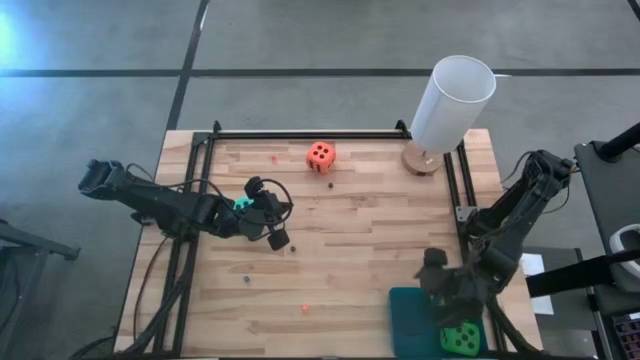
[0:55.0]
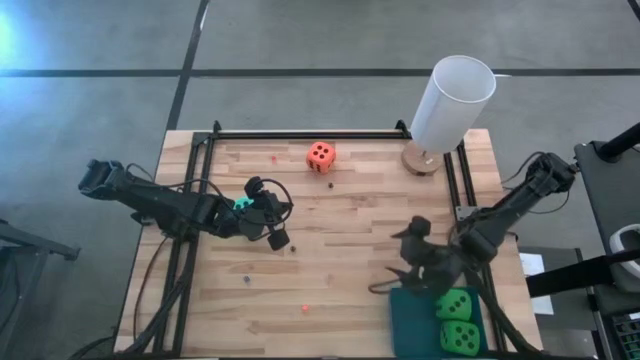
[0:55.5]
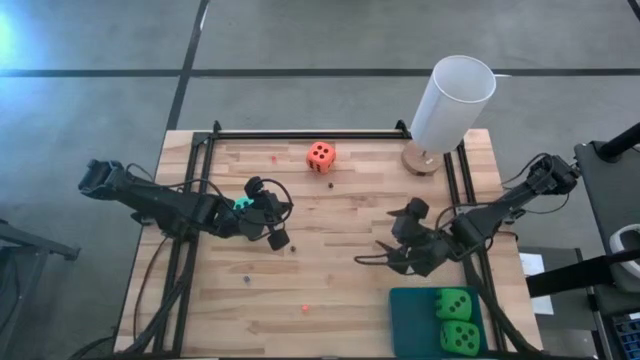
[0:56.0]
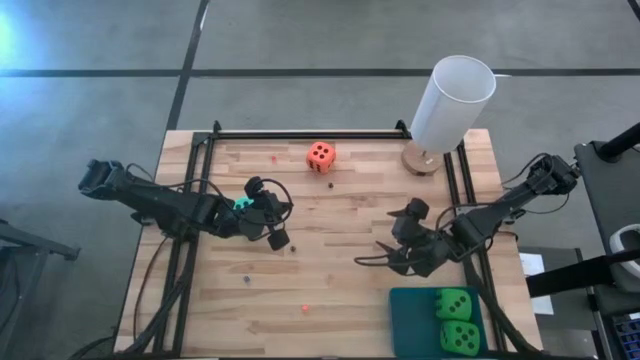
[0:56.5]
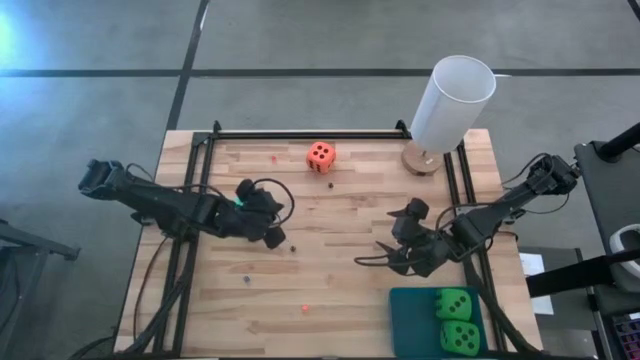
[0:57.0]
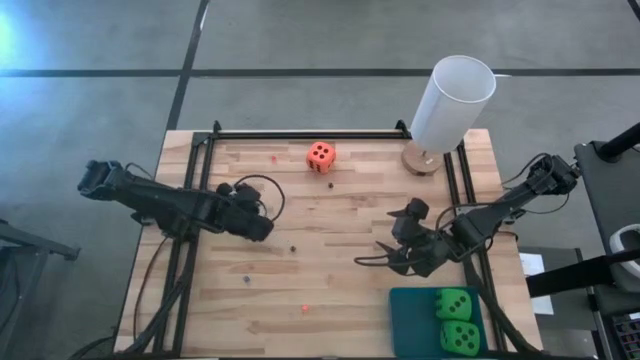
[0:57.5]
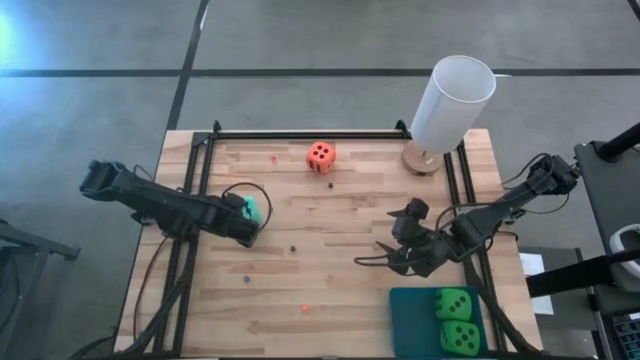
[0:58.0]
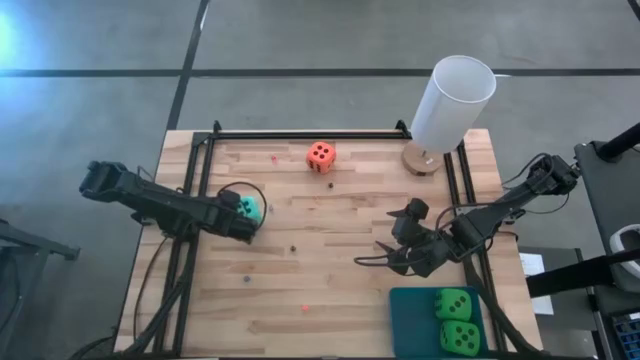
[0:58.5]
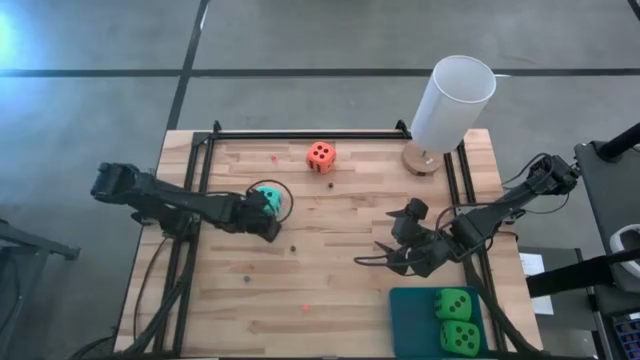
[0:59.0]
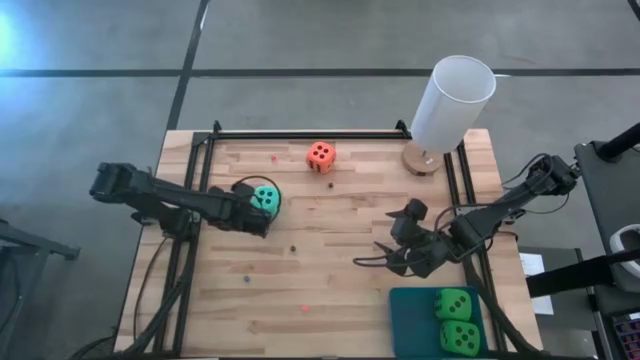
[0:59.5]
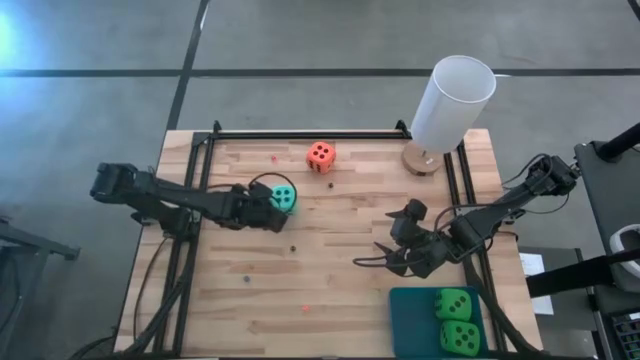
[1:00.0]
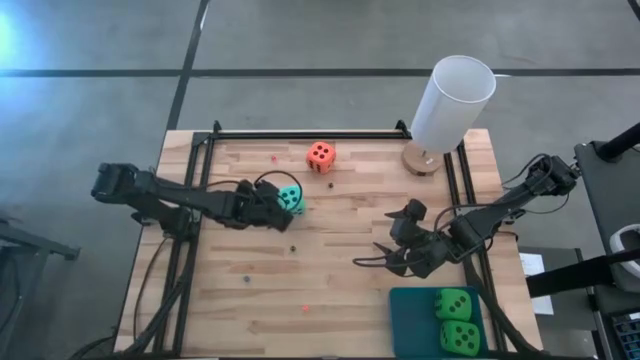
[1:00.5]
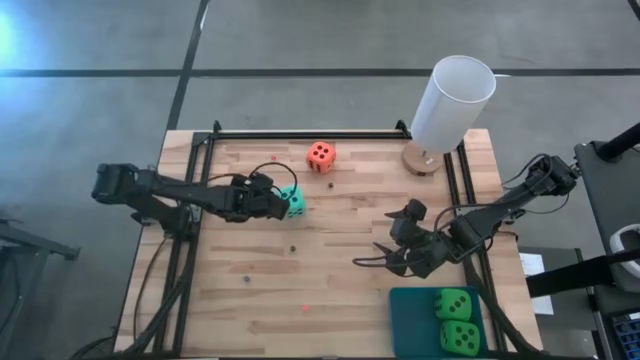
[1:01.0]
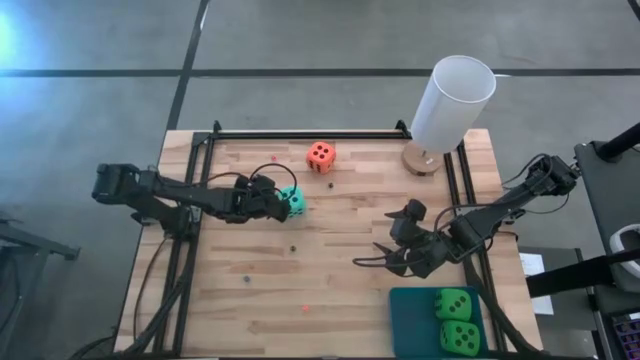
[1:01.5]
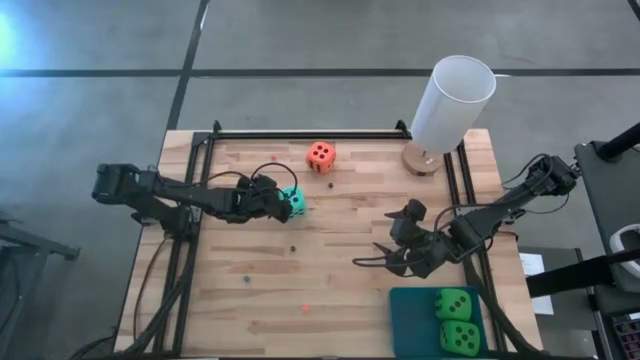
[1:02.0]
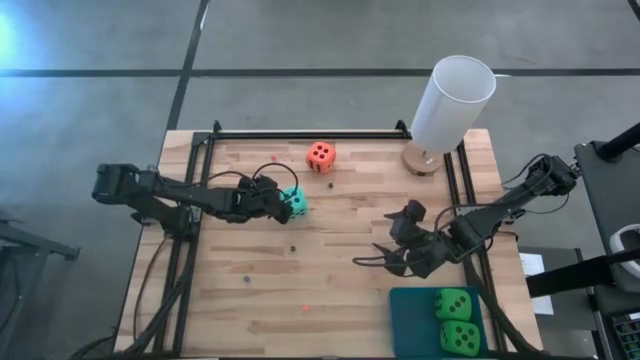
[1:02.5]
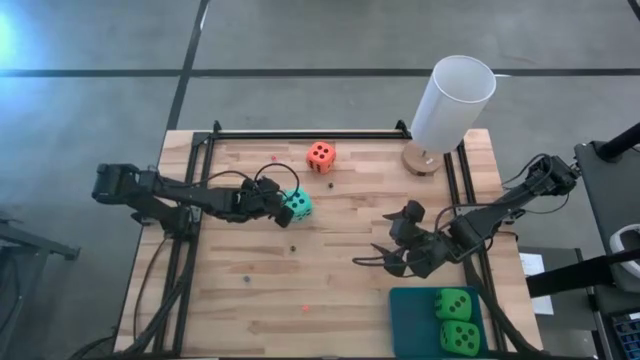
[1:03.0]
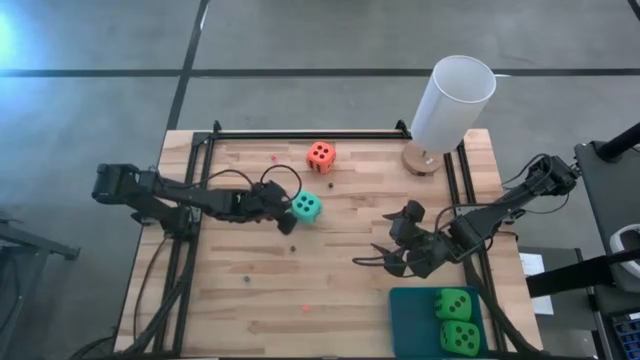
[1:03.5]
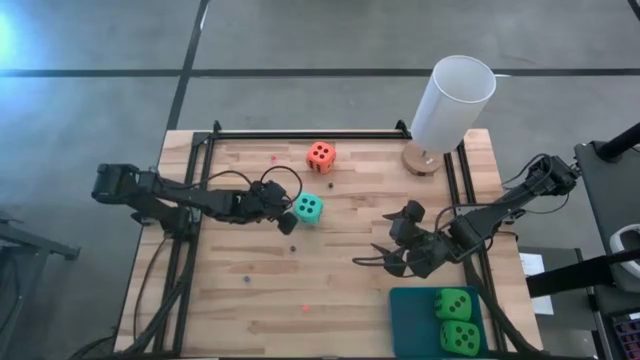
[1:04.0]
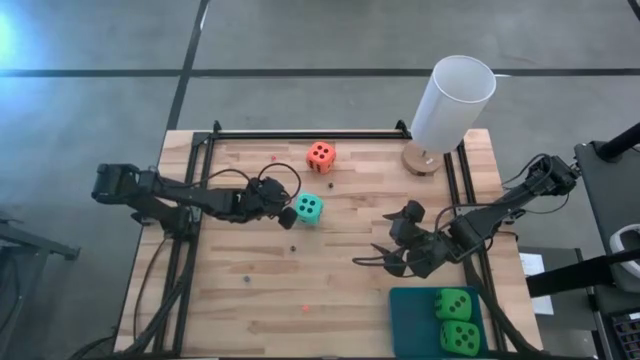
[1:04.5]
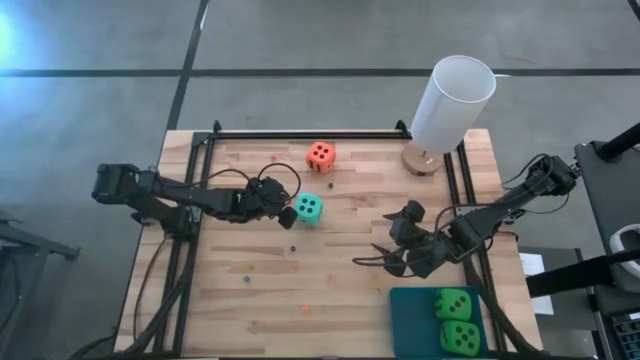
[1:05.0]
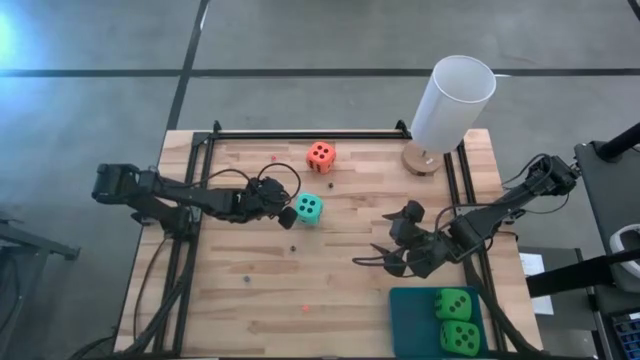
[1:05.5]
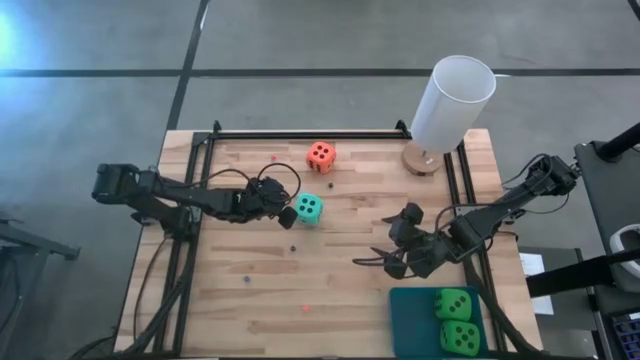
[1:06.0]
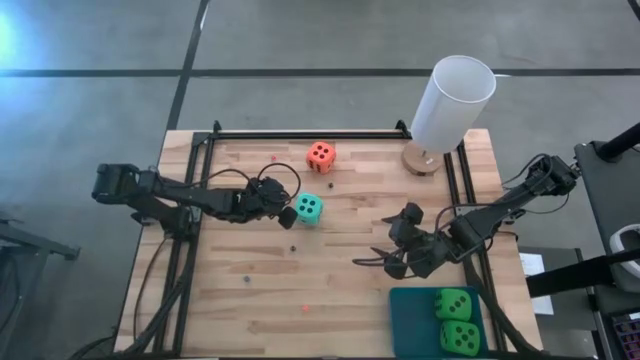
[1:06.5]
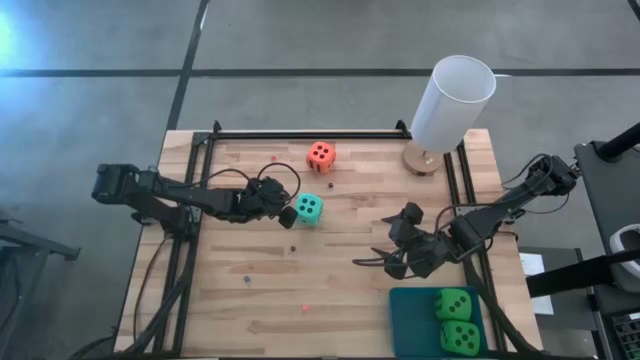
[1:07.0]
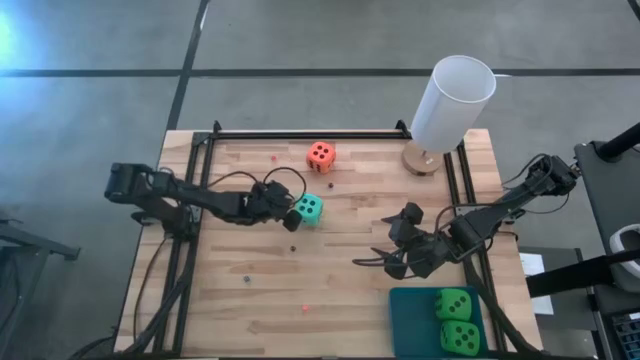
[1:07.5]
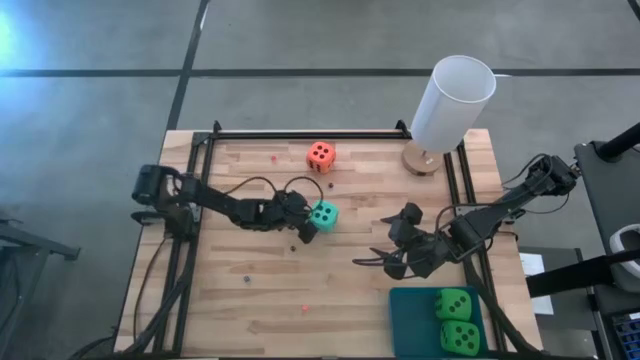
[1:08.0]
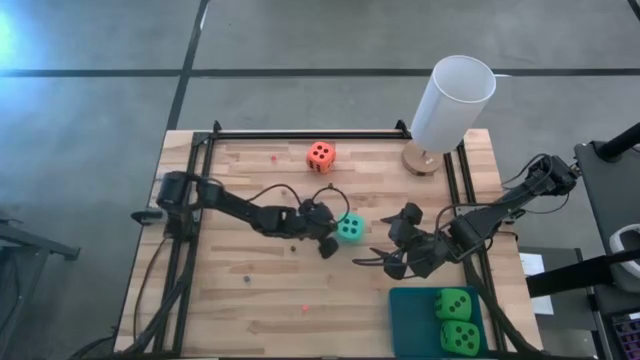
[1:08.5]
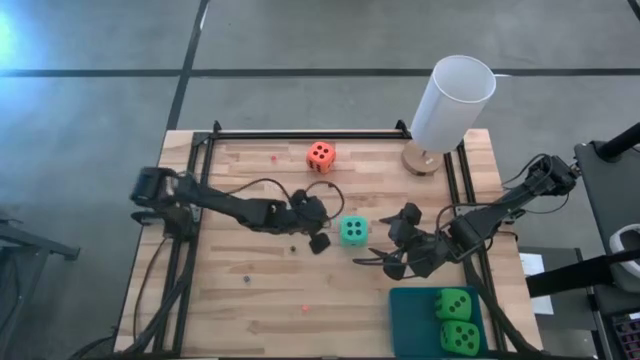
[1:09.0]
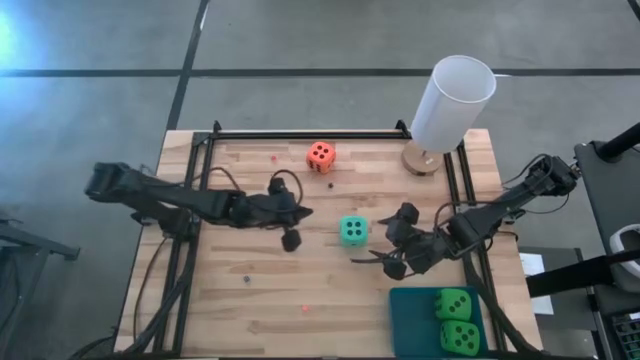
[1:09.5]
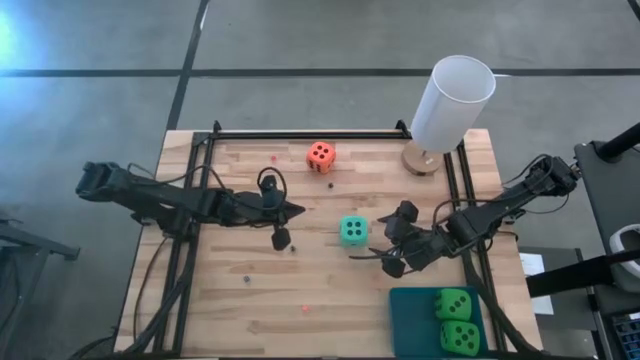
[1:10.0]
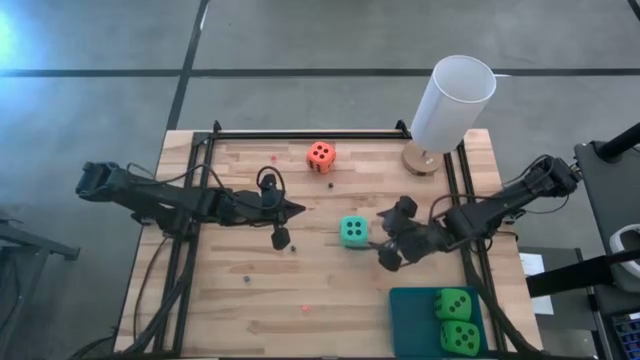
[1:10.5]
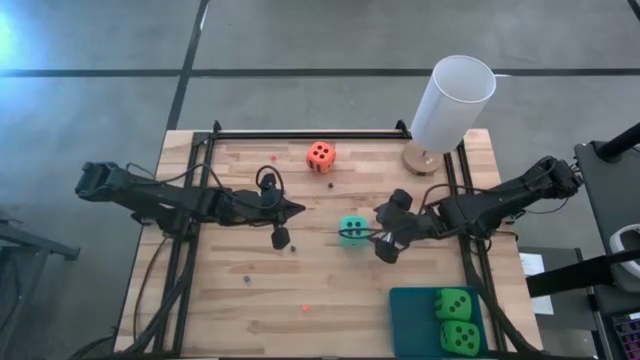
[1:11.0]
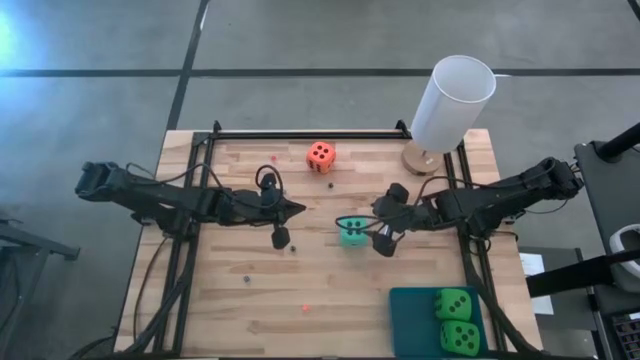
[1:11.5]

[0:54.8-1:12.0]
Task: Pick & Place Dice
Put the large blue die into the blue bin

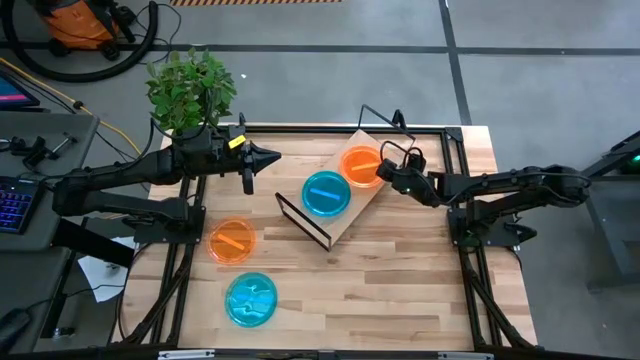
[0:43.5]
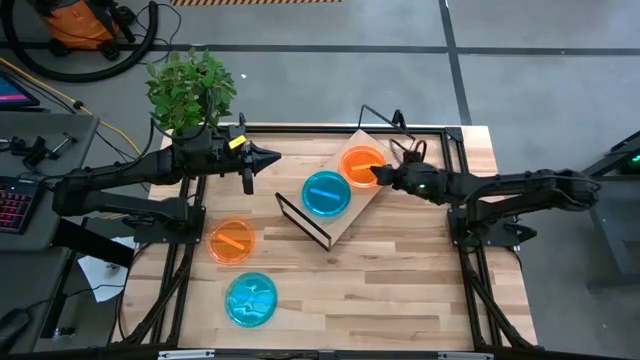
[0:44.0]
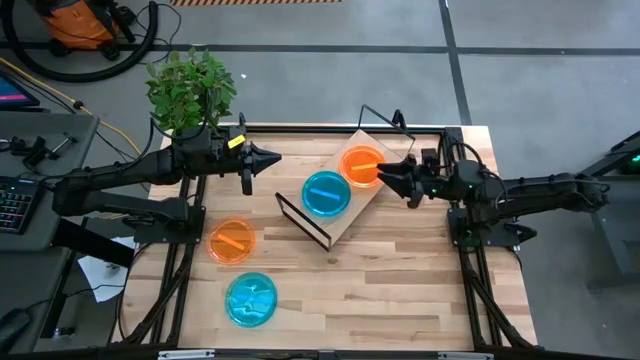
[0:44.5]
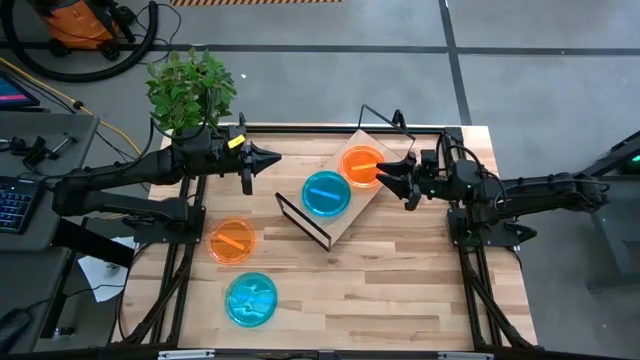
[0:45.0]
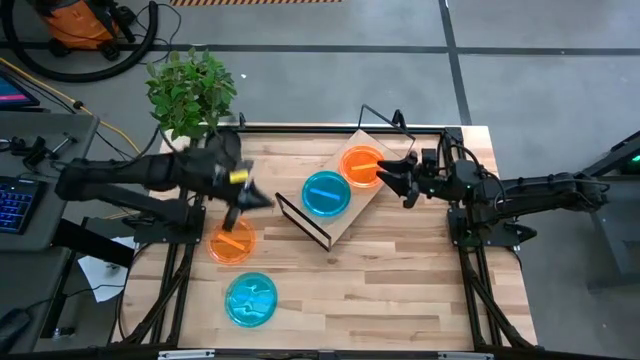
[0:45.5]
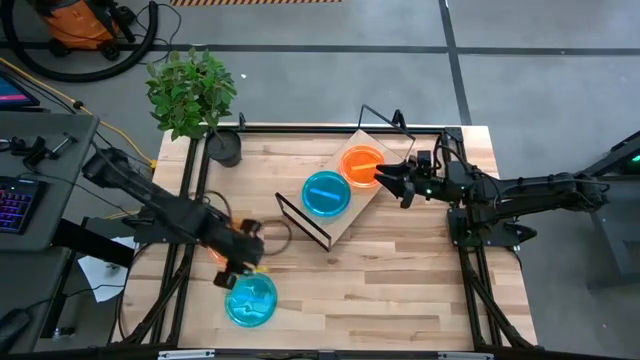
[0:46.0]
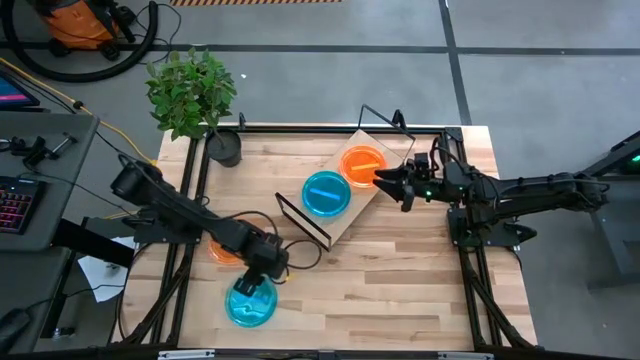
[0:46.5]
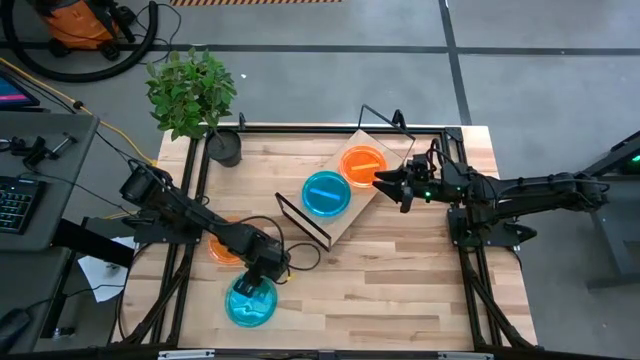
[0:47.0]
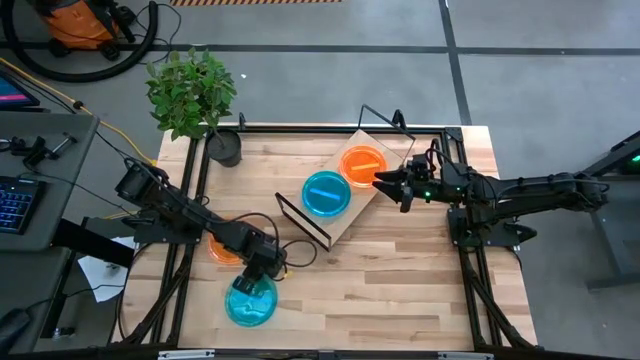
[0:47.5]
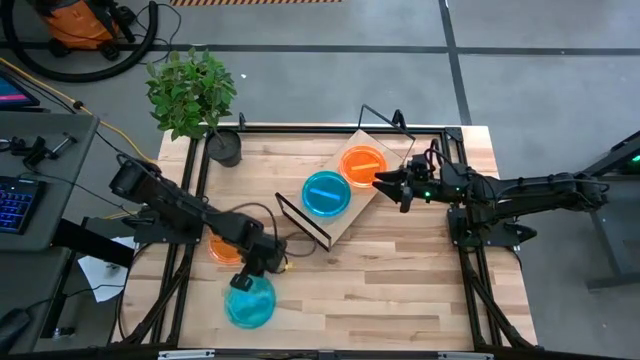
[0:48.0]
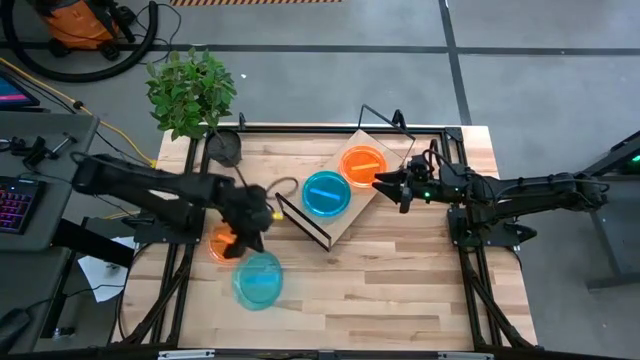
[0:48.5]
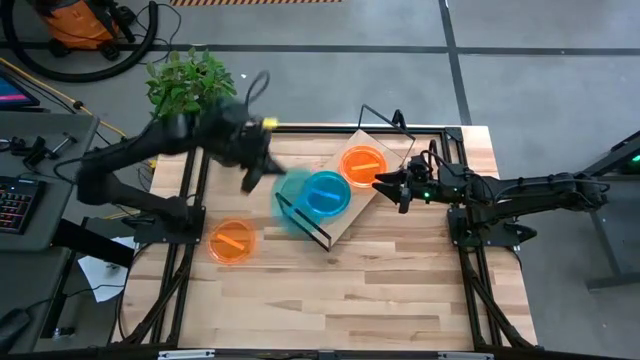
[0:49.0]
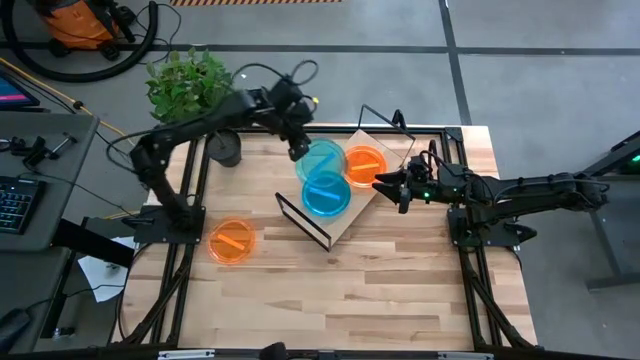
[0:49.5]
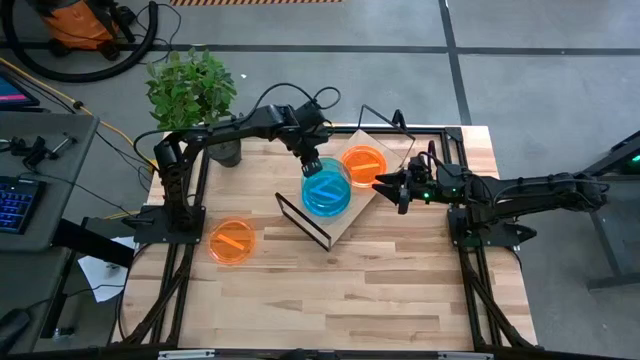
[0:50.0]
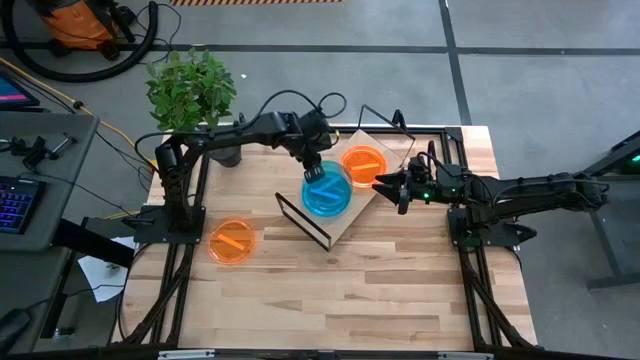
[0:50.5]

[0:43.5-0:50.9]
Task: Place and stack plates onto a shelf
Stack the blue plate on top of the blue plate on the shelf
